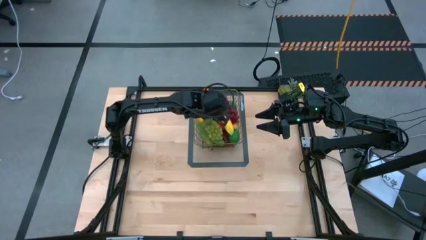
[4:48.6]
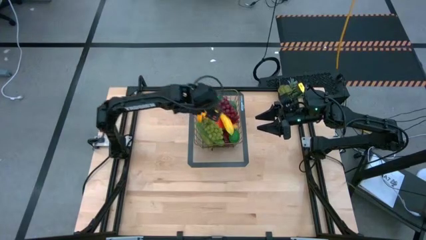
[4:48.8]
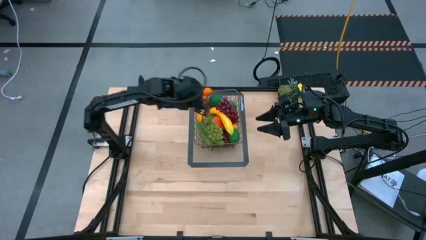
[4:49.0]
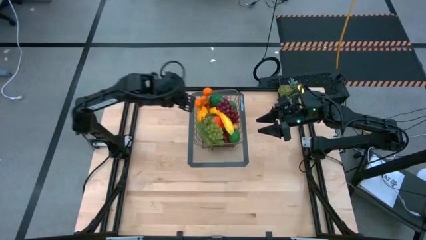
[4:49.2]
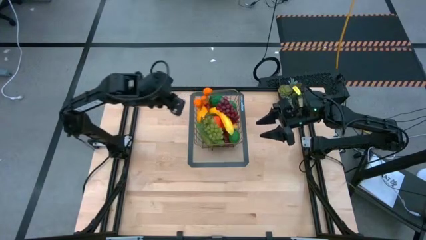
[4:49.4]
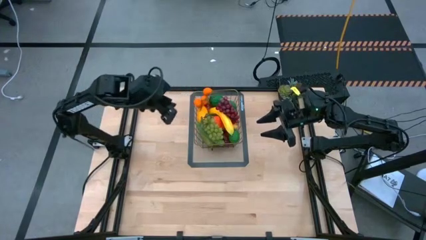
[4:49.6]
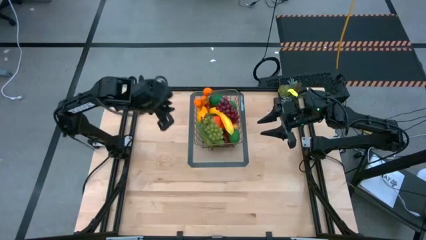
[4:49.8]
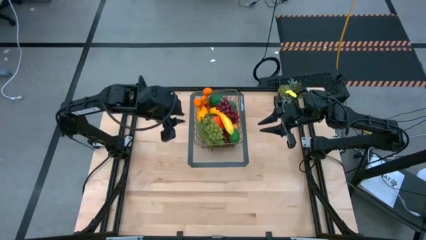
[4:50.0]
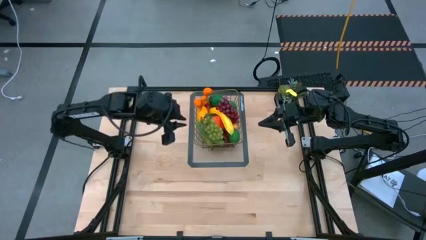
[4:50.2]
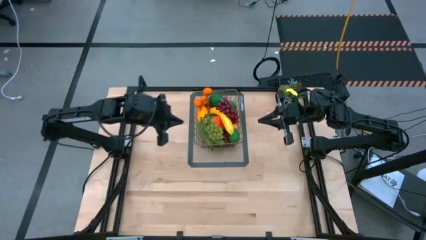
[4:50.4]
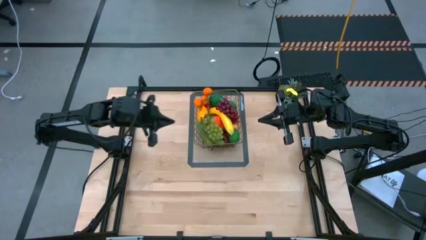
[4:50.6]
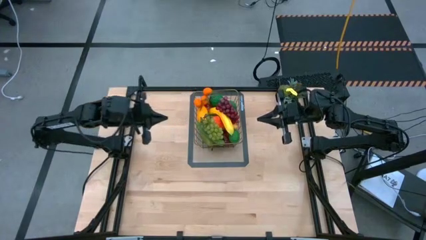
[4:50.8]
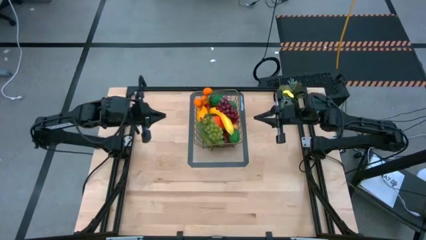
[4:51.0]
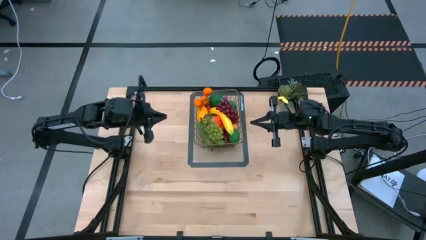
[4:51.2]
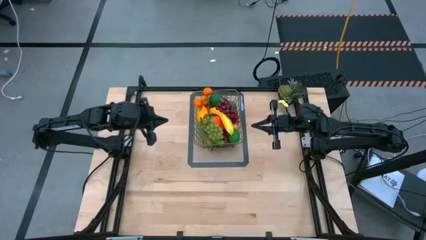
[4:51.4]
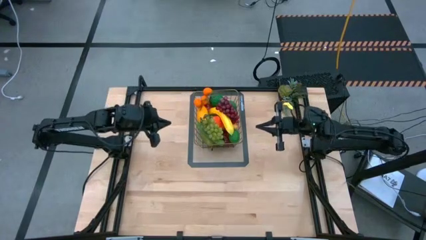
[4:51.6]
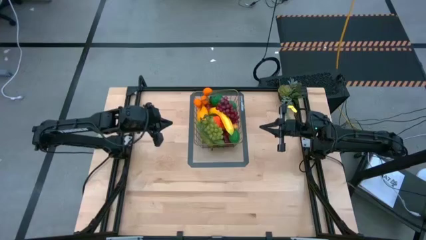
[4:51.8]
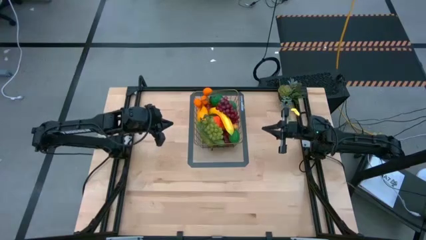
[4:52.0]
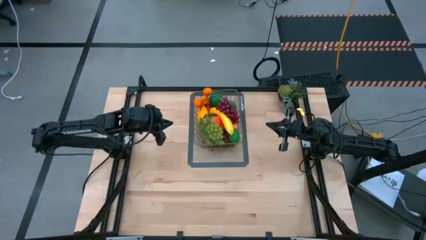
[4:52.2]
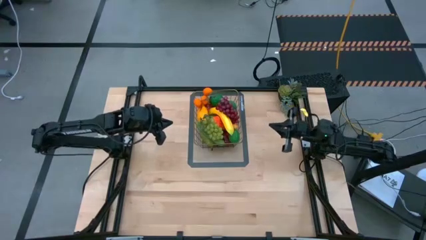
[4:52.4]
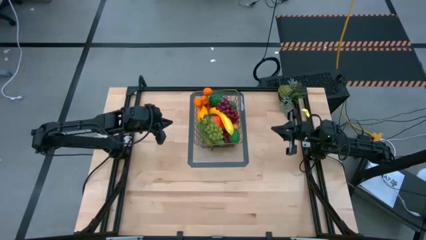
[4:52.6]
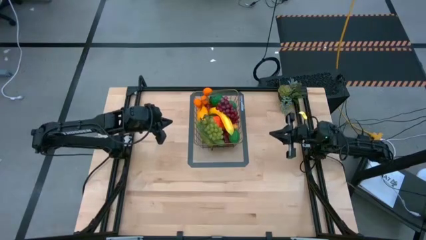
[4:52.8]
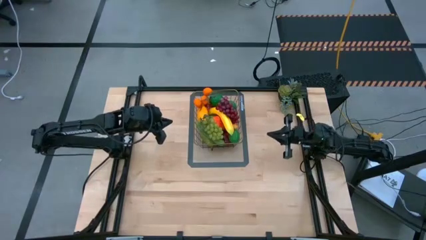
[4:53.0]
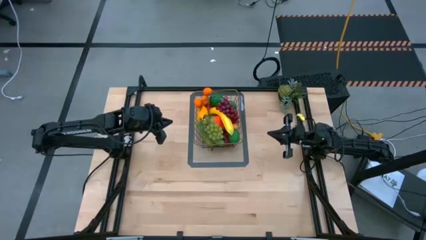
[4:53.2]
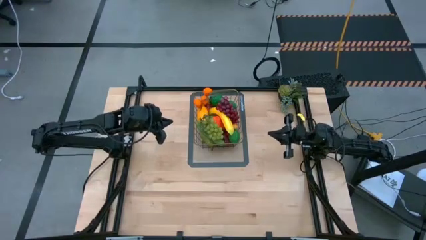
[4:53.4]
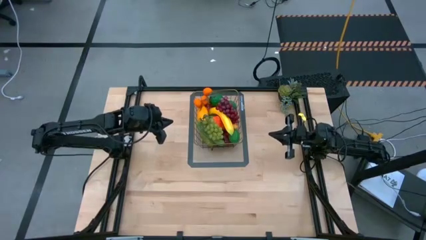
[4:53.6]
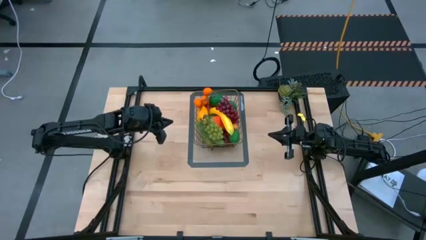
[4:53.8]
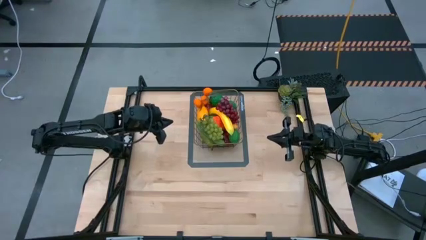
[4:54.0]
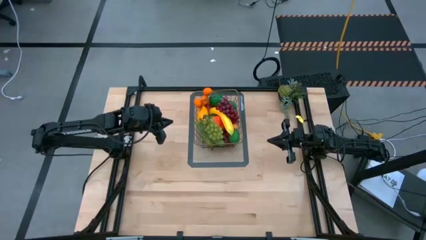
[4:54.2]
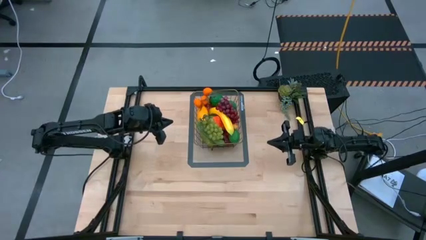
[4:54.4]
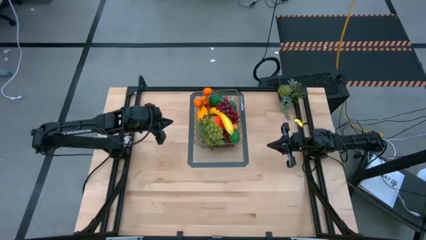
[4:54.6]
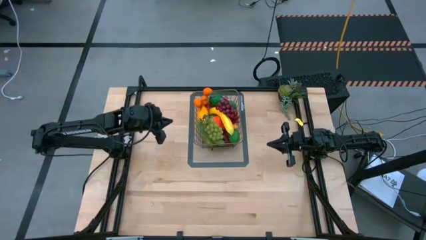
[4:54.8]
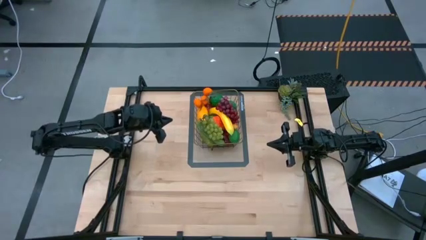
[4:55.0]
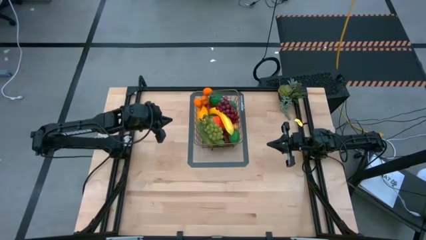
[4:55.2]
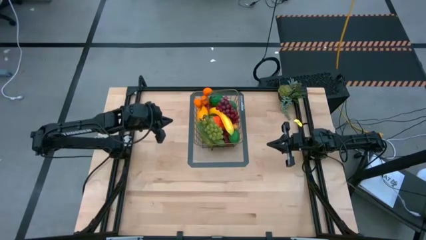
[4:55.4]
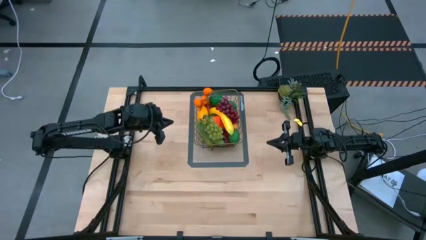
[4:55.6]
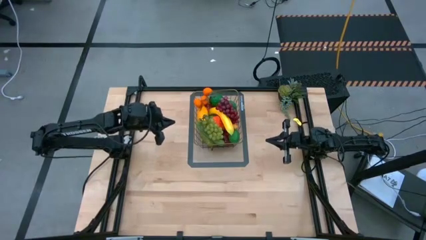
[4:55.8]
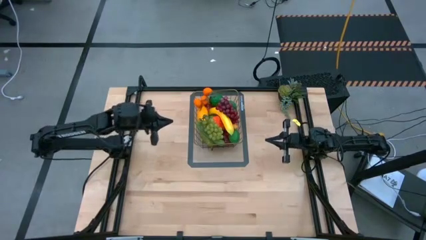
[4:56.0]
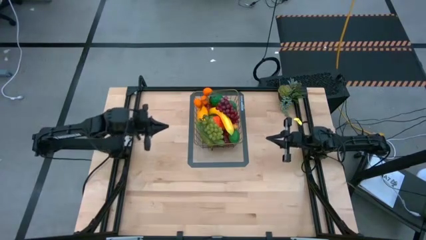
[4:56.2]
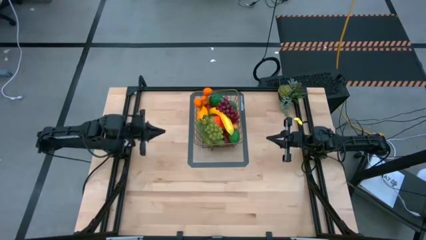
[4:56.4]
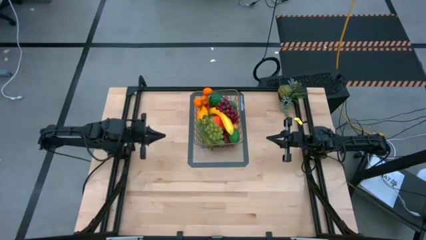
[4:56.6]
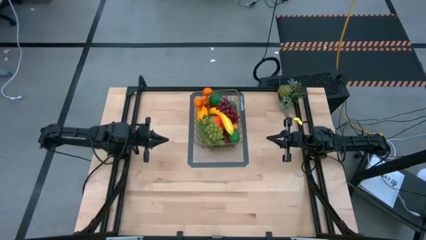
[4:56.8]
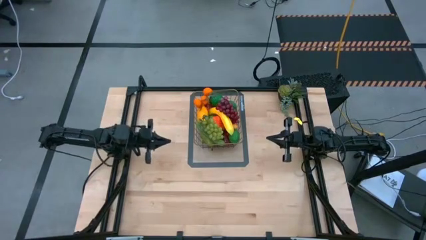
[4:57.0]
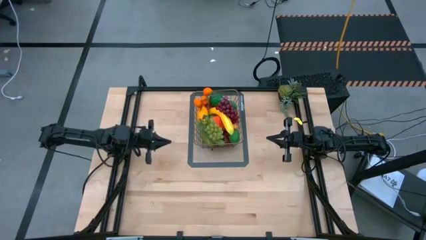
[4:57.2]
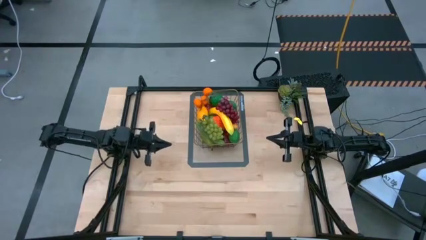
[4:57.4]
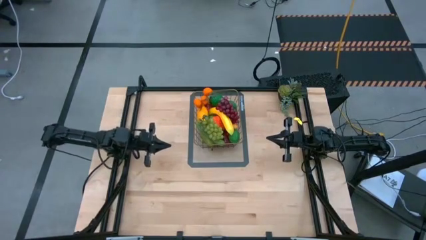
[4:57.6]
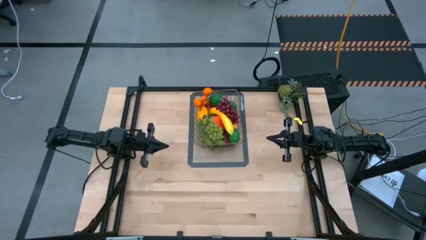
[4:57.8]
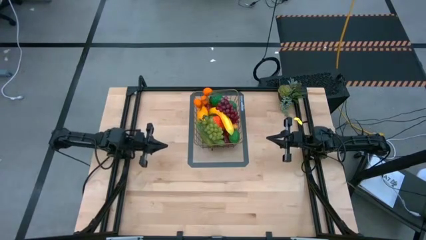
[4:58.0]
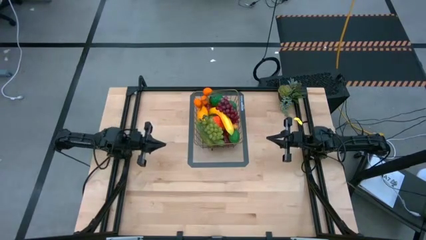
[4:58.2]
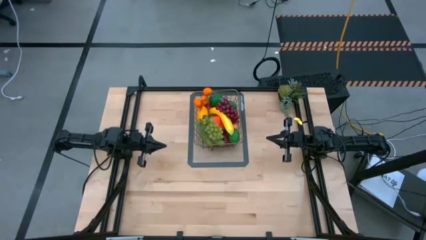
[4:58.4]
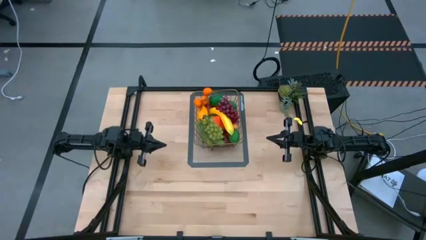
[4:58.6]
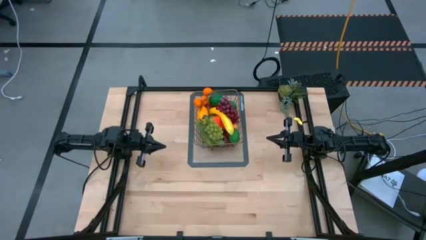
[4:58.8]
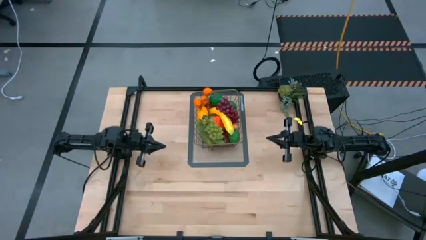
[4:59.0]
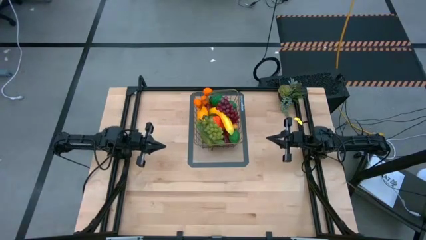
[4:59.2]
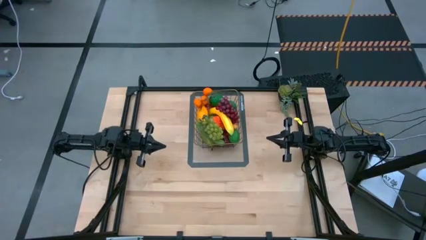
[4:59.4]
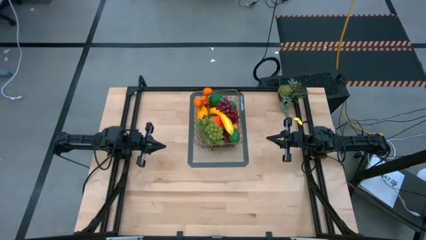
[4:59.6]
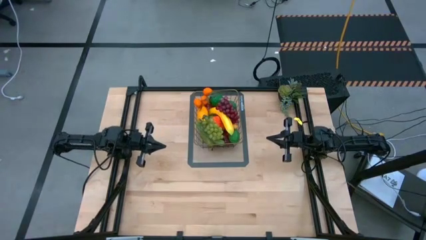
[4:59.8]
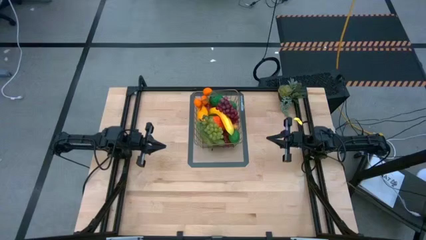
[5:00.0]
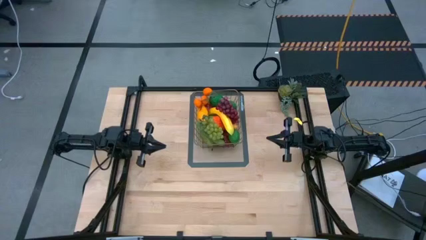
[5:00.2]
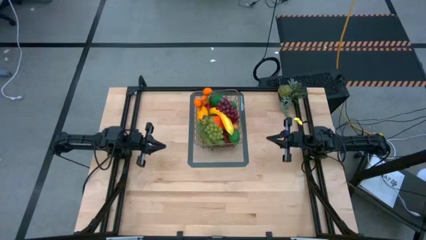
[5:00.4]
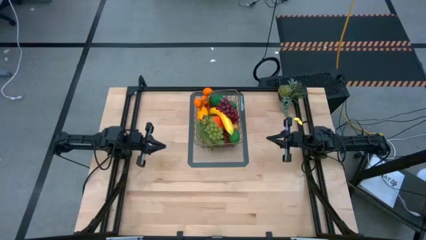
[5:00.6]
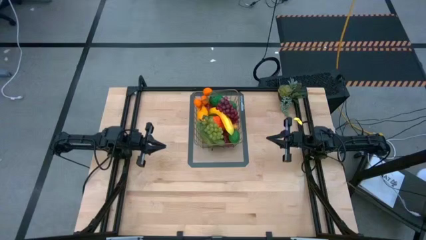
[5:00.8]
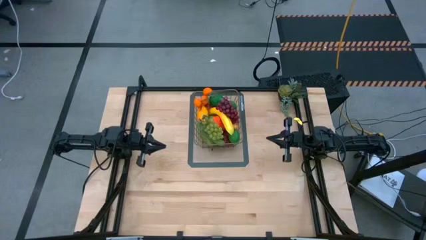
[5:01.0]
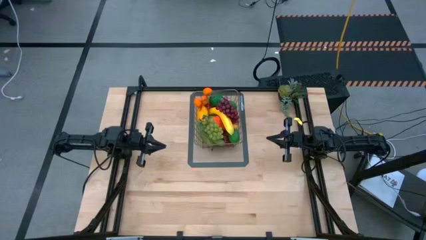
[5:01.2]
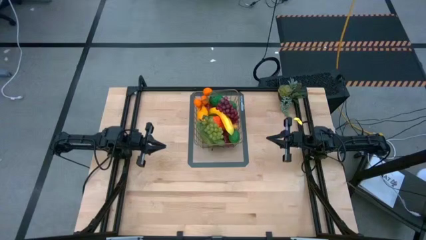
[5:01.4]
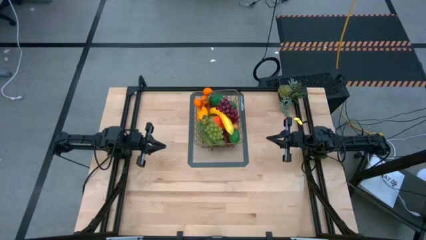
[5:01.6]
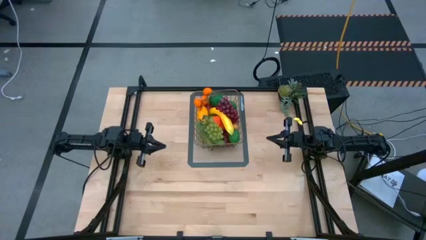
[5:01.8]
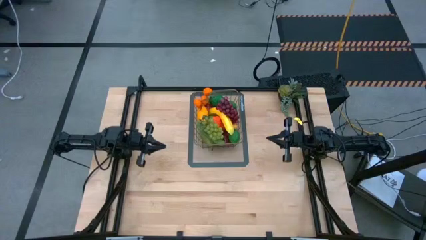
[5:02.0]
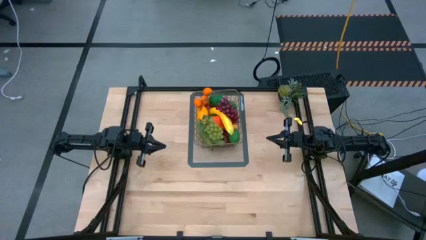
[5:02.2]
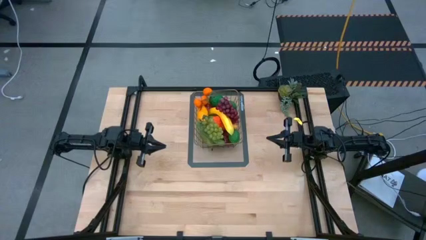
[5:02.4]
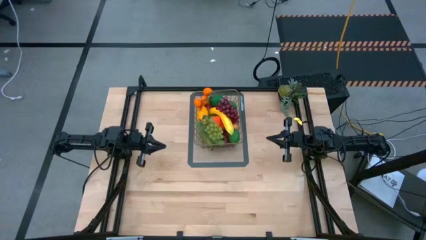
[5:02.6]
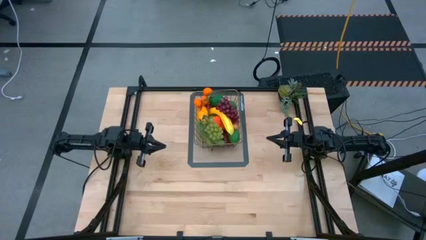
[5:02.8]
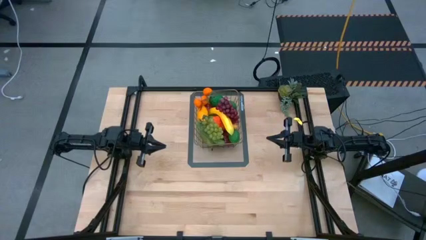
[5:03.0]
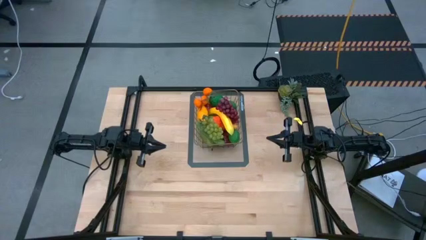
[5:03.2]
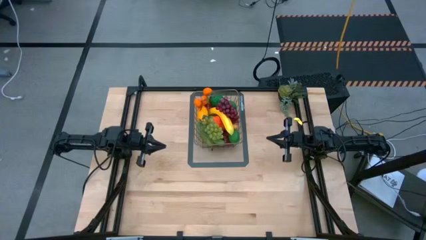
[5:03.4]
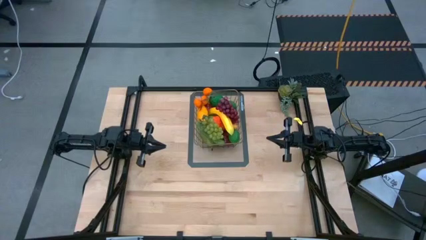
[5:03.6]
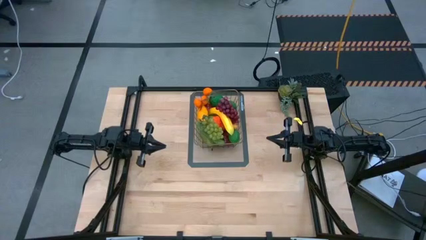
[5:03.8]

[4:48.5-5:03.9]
Task: Build produce basket
Return to Home Position
